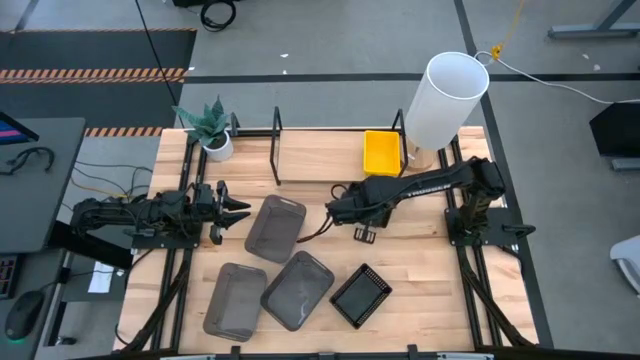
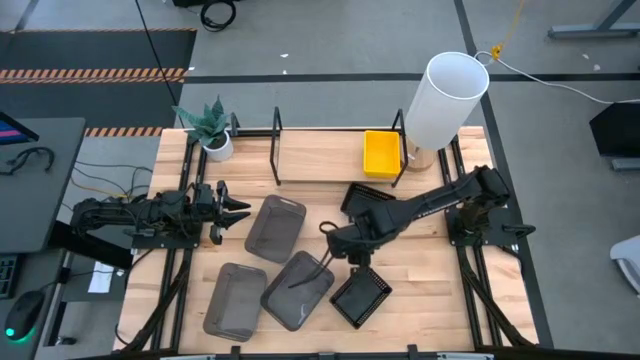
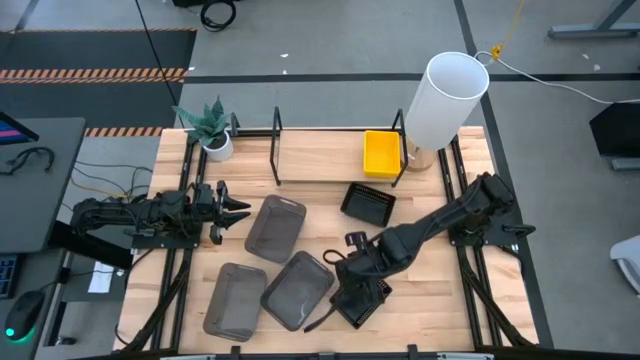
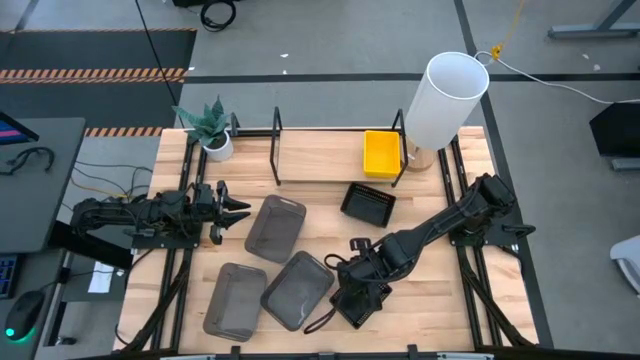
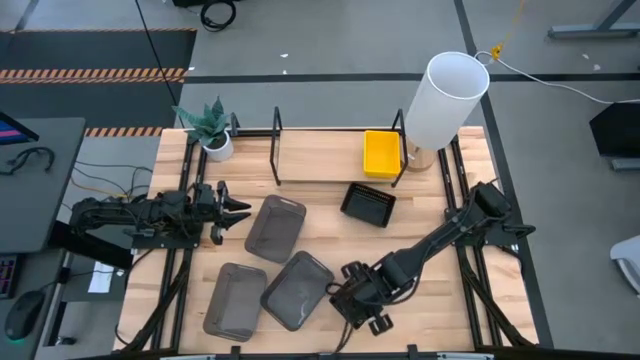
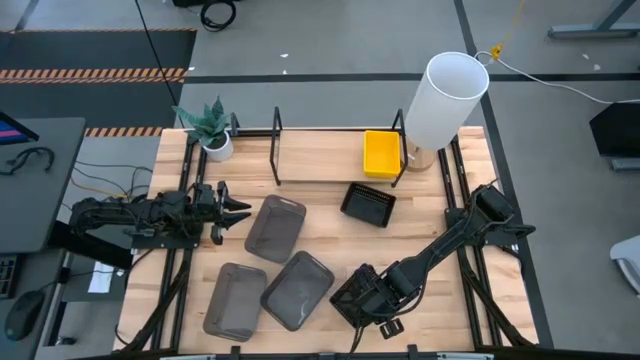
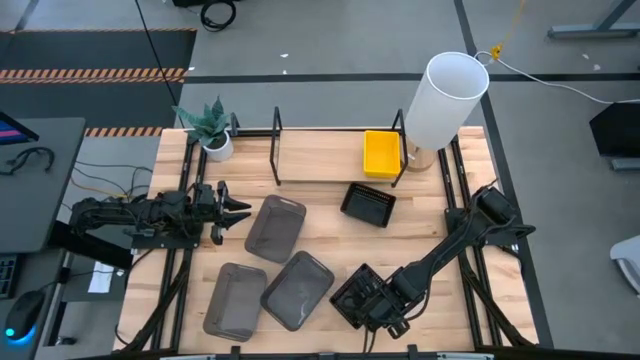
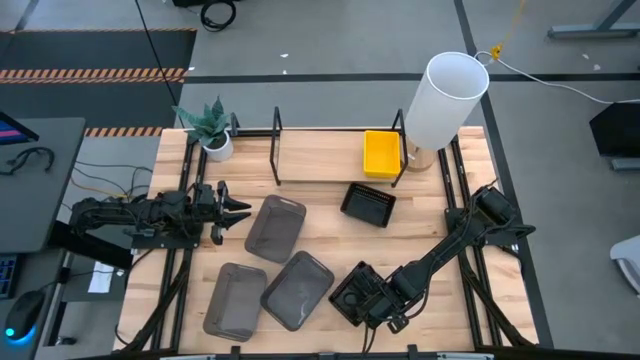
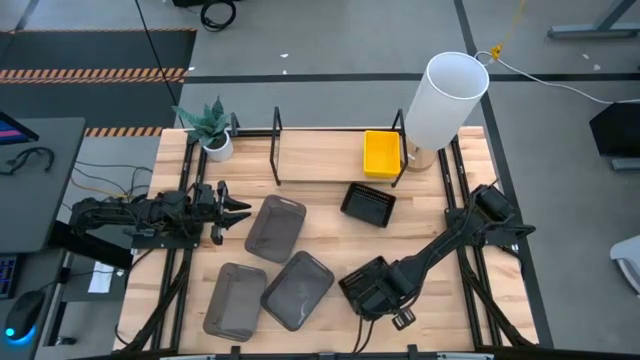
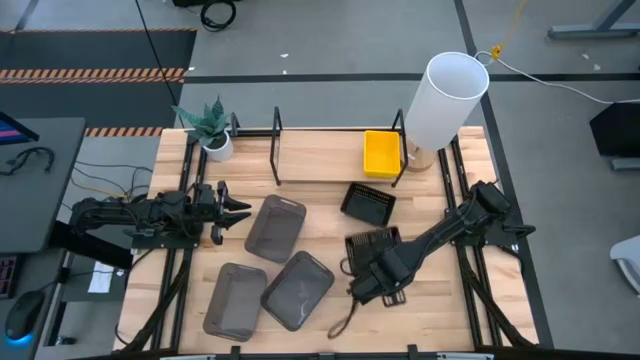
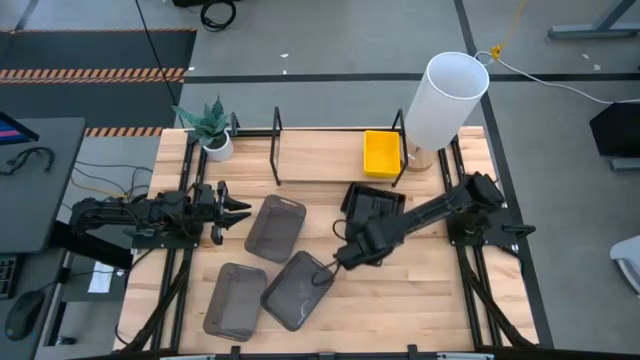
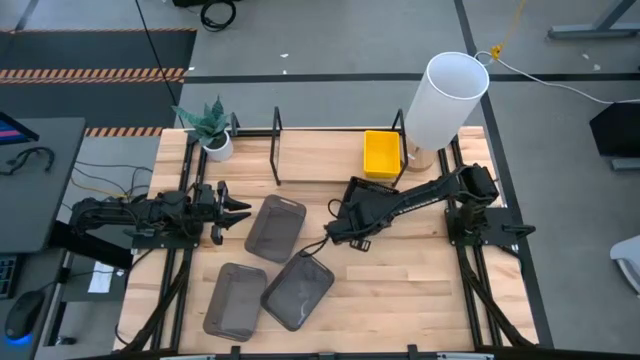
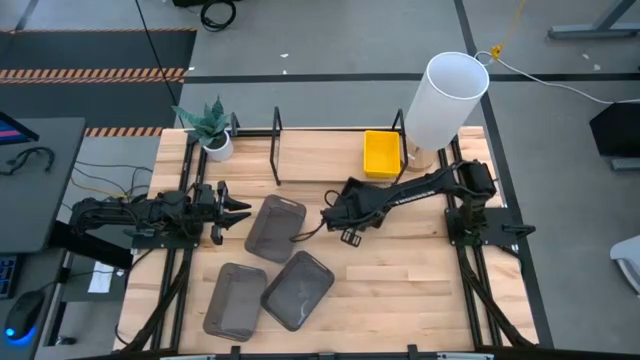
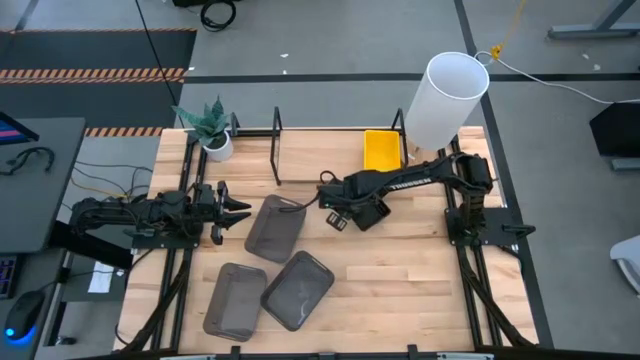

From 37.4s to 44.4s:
Task: Stack baskets on shelf by color
Stack the bottom black bin on top of the top black bin

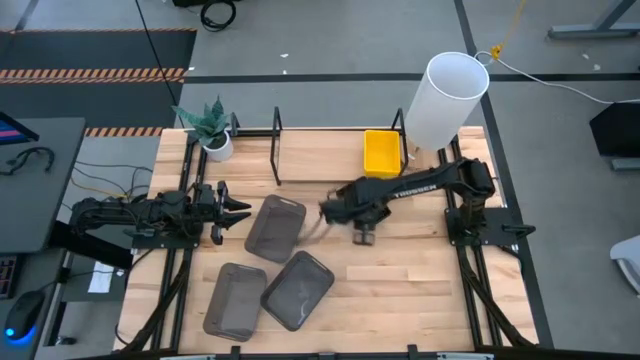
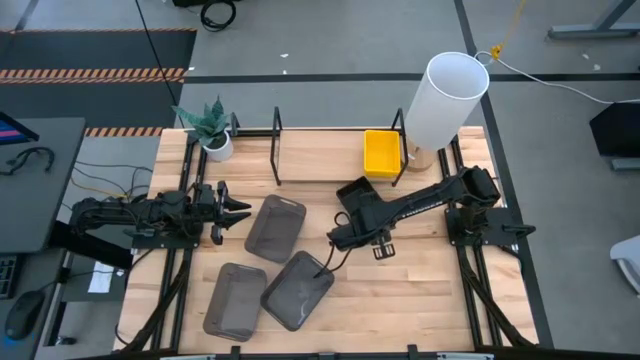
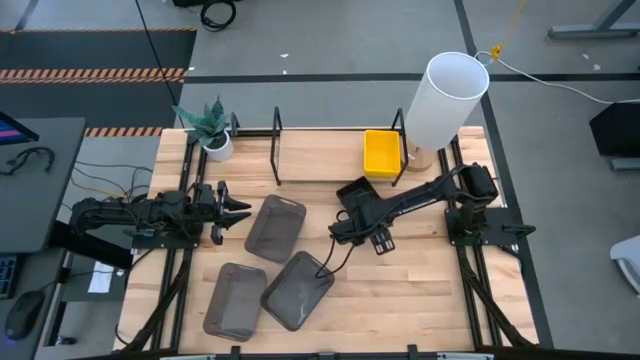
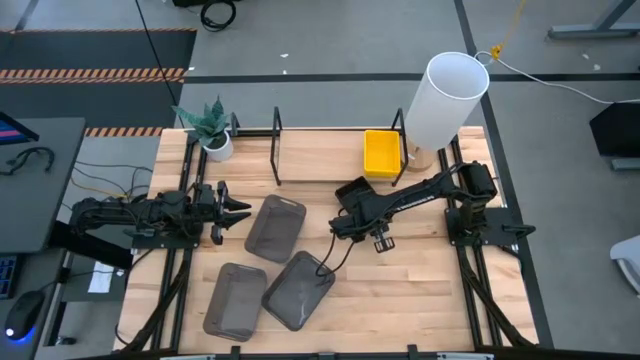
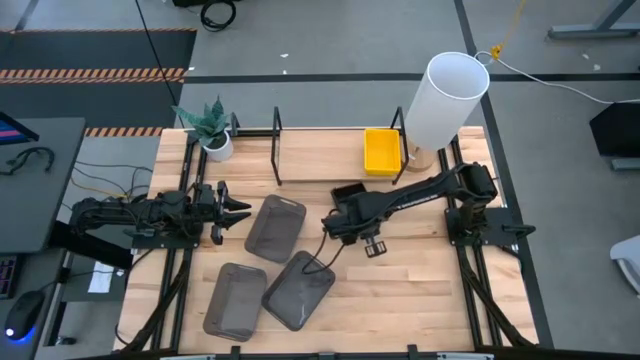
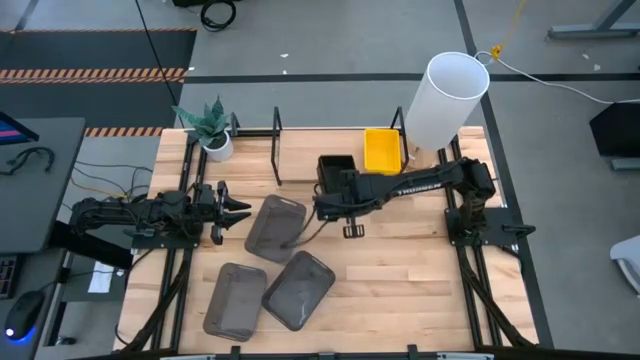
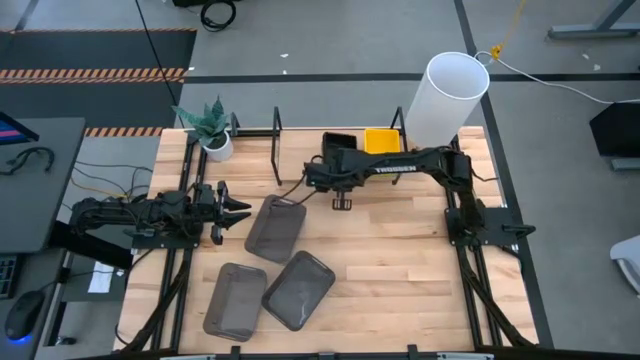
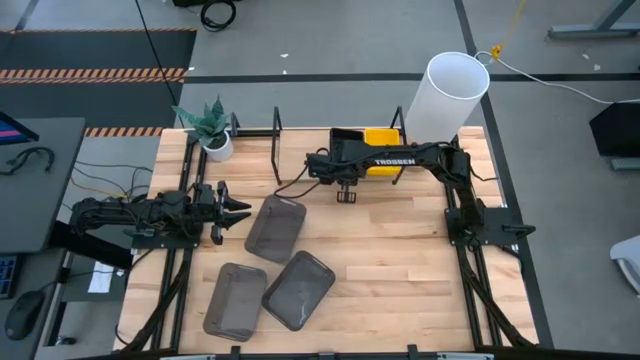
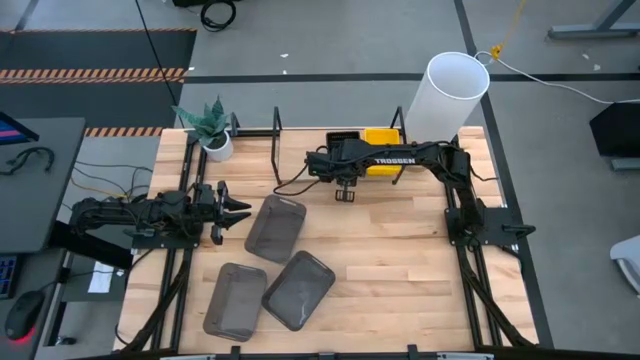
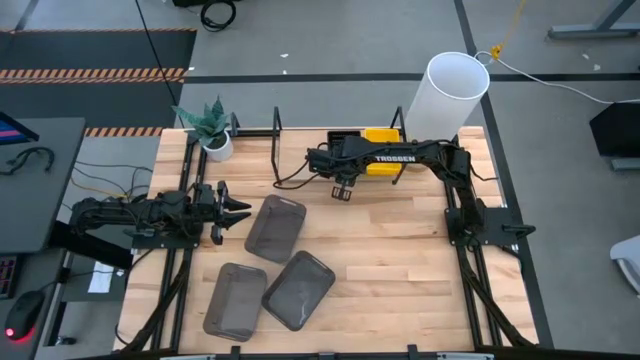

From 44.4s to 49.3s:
Put the stacked black bins on the shelf

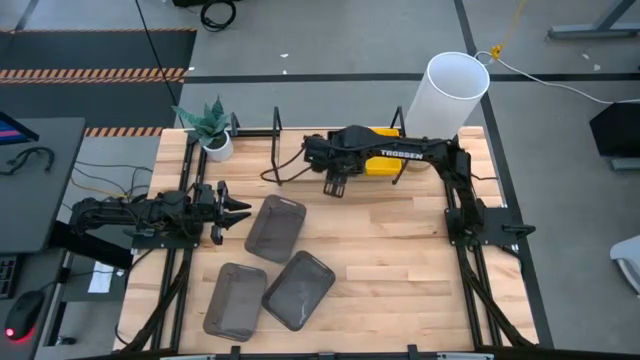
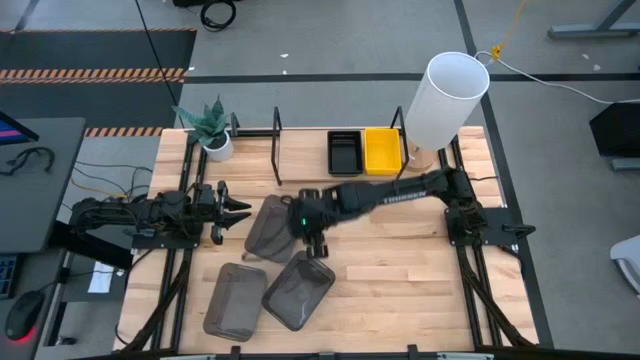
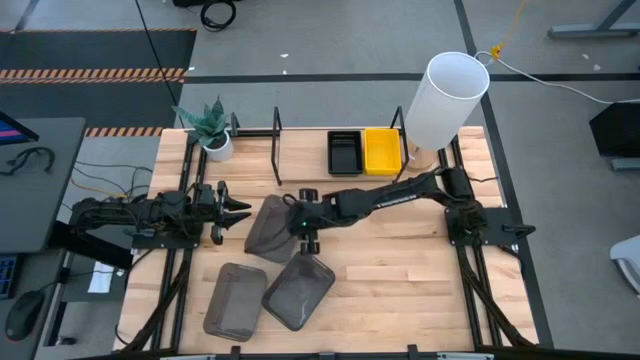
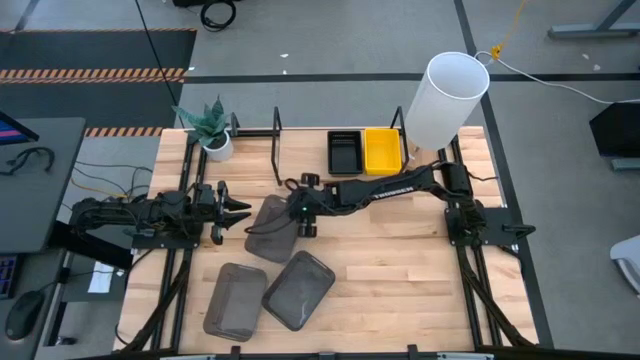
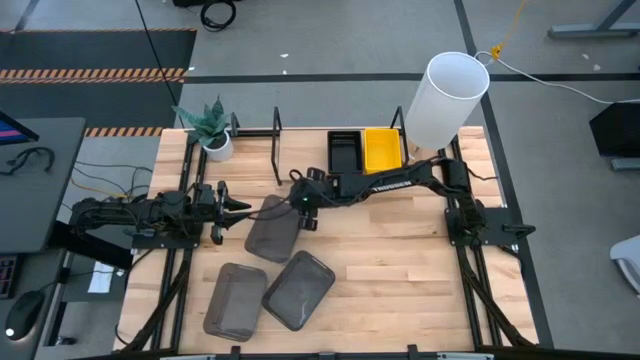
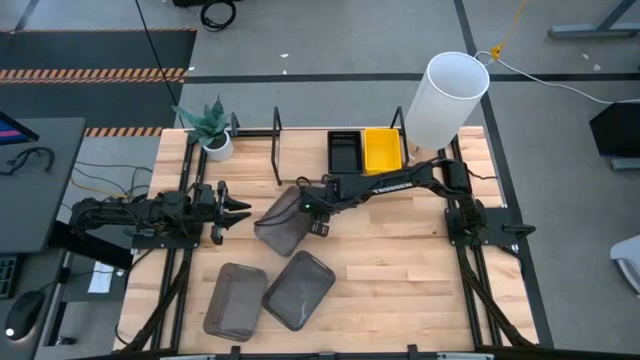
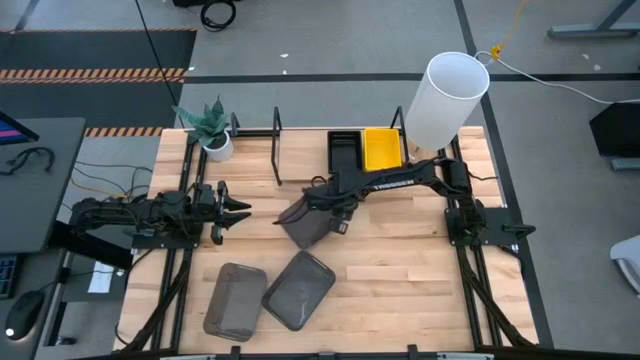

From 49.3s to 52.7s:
Adjust the top gray bin

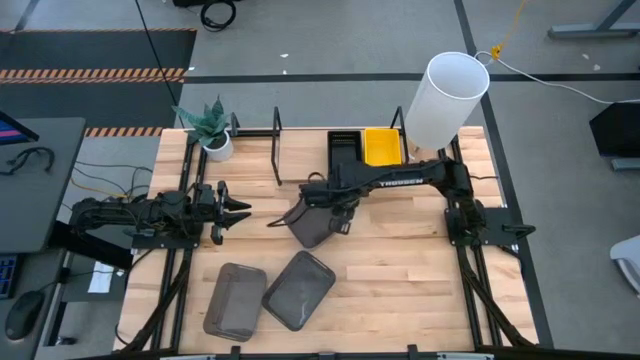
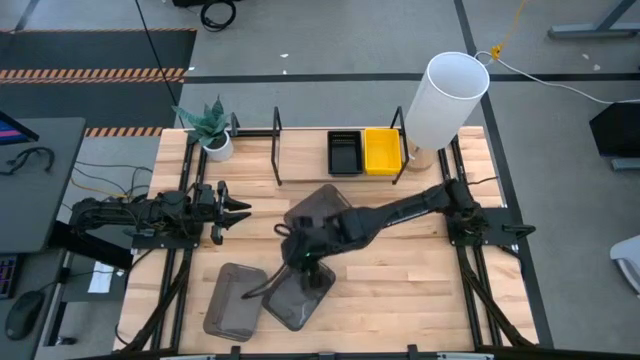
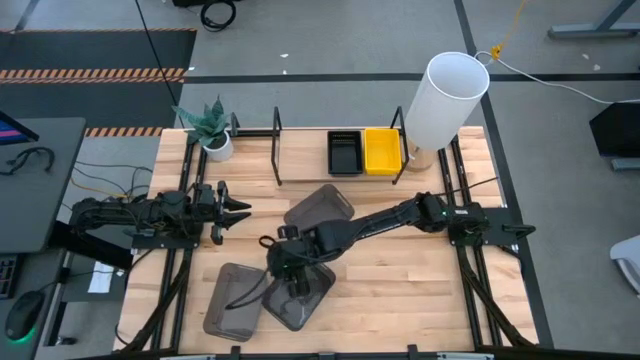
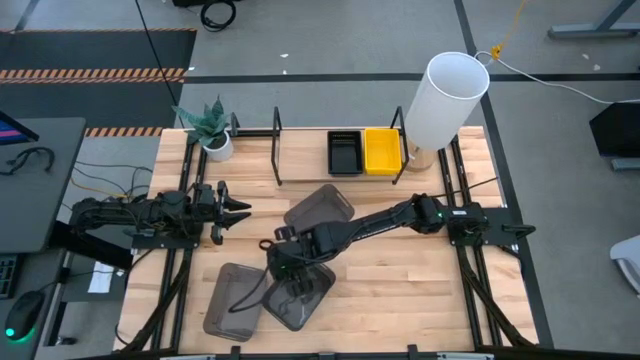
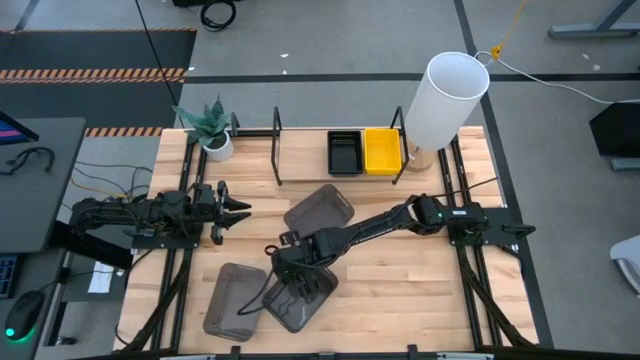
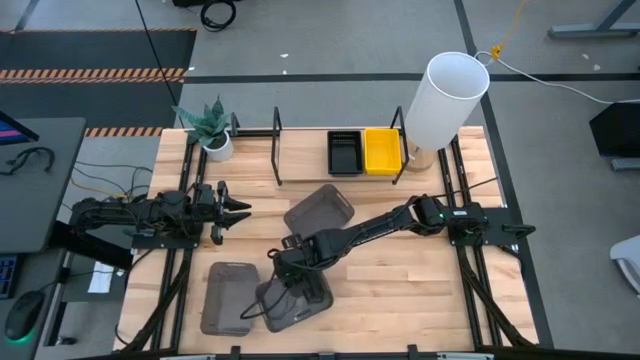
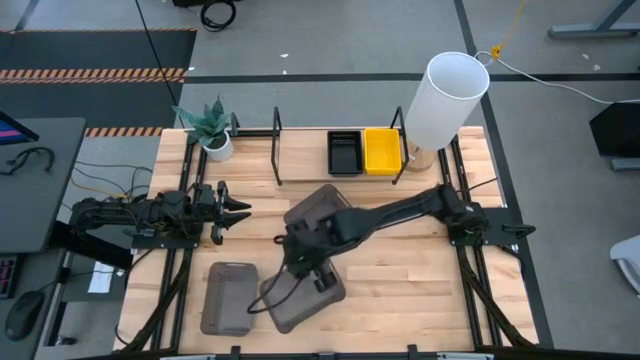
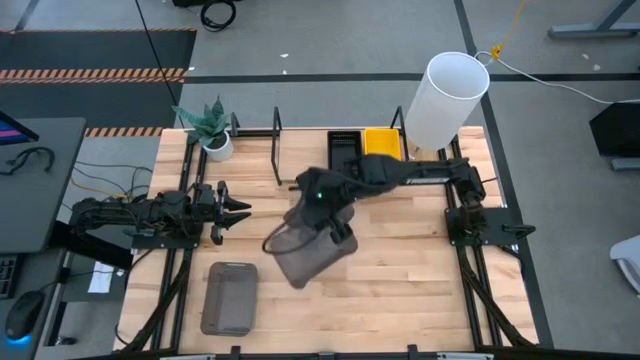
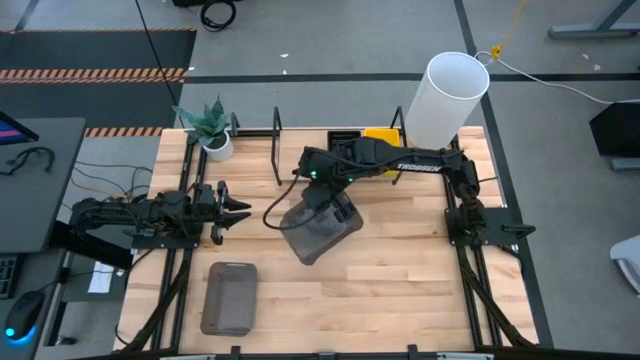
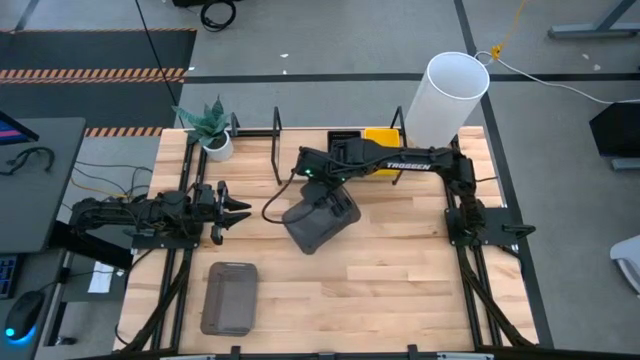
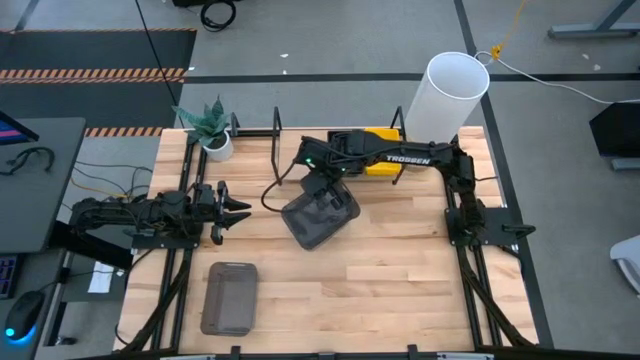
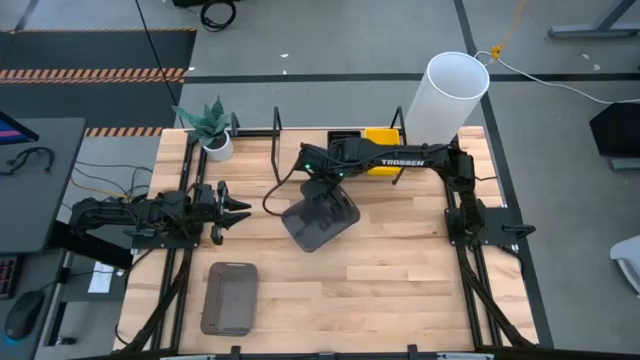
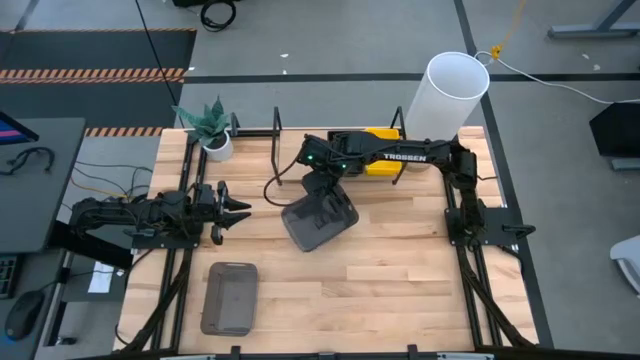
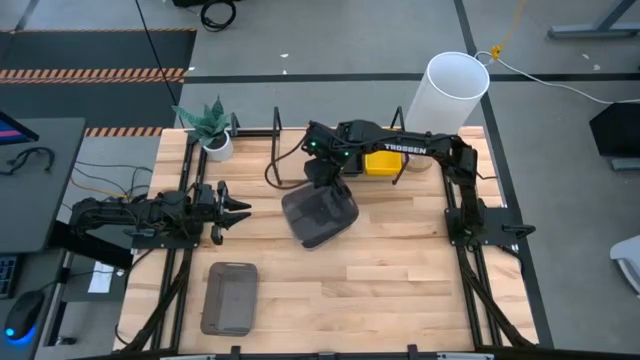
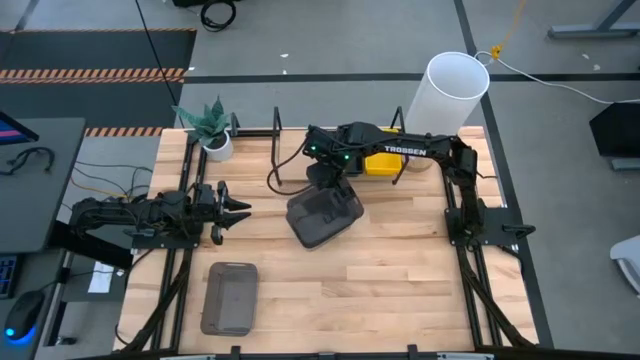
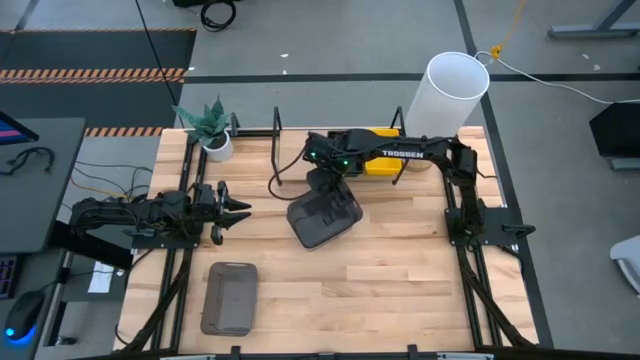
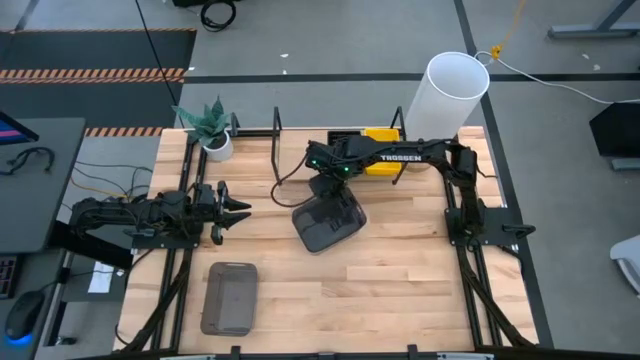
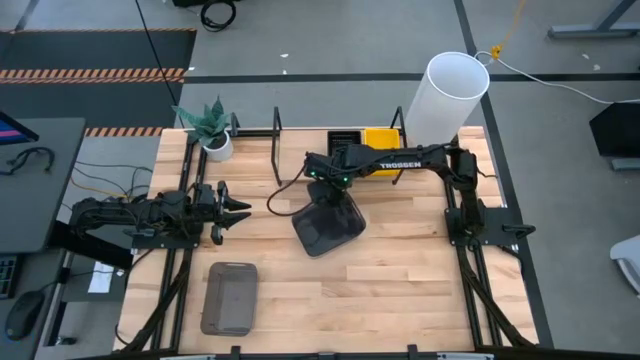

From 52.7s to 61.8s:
Stack the middle gray bin on top of the top gray bin
